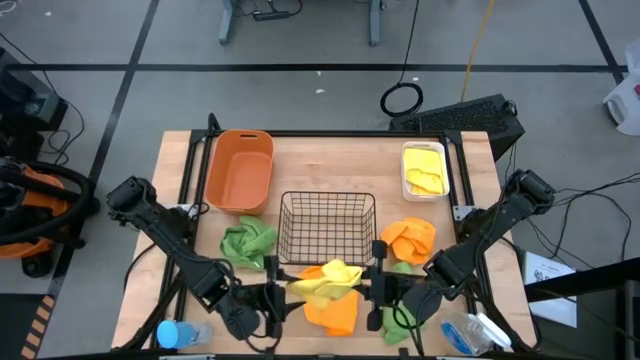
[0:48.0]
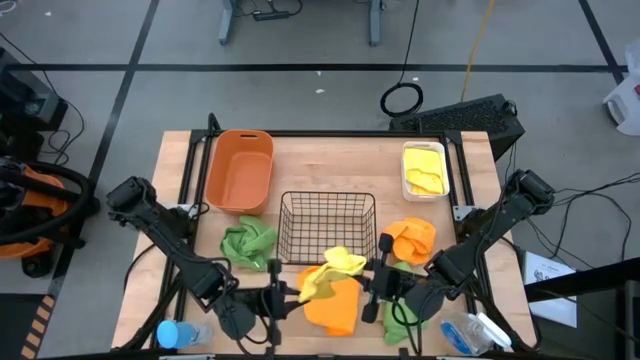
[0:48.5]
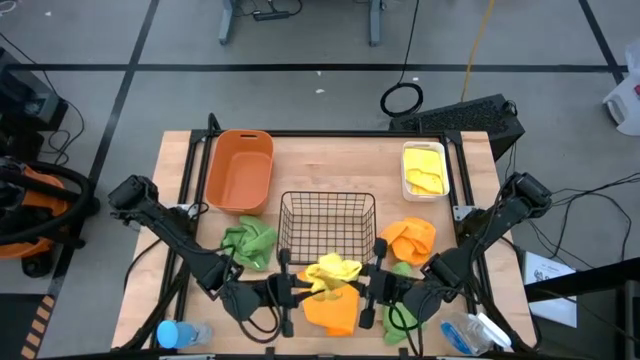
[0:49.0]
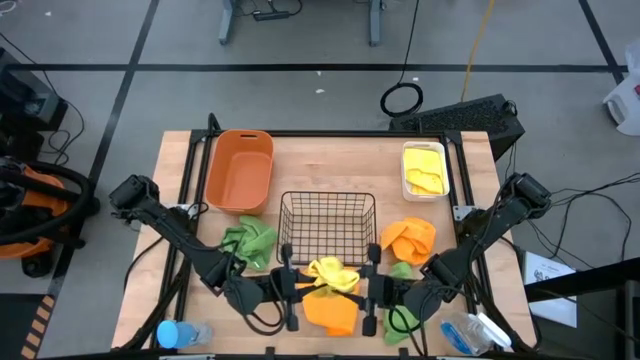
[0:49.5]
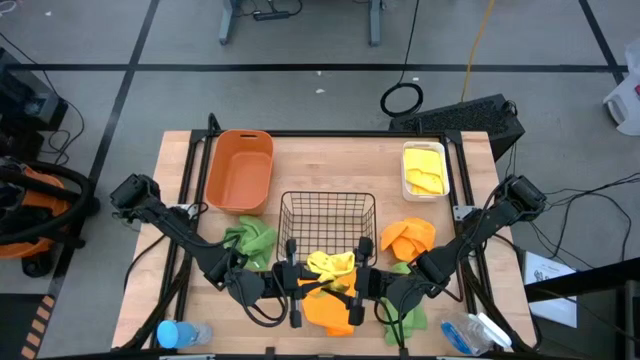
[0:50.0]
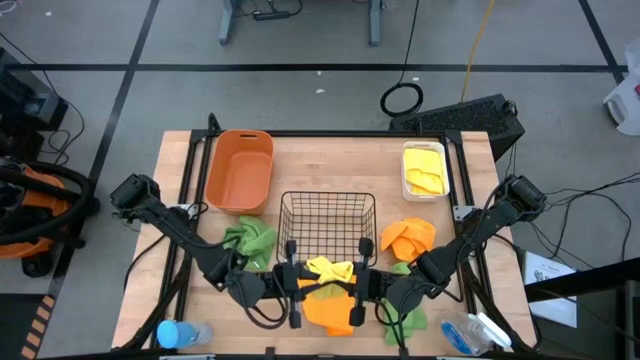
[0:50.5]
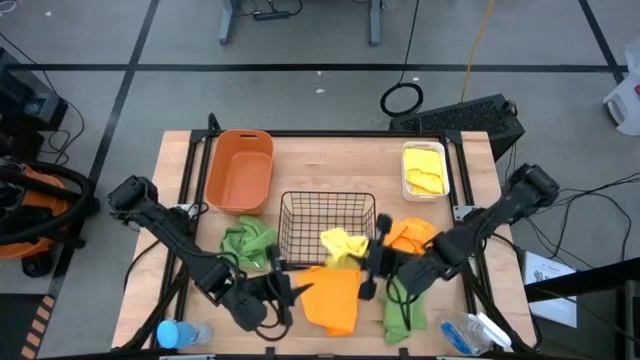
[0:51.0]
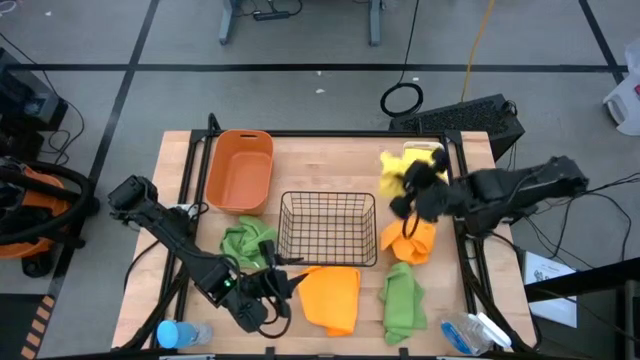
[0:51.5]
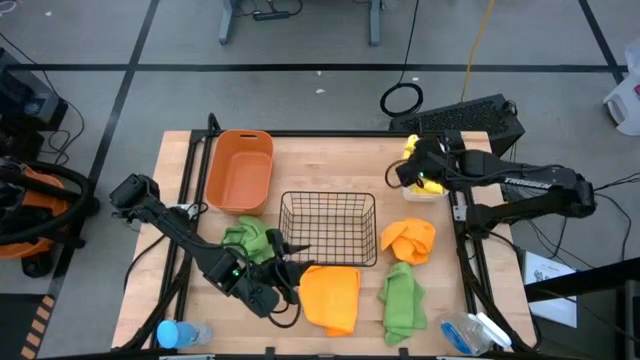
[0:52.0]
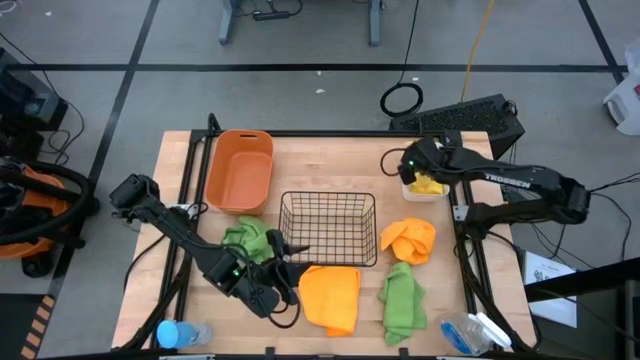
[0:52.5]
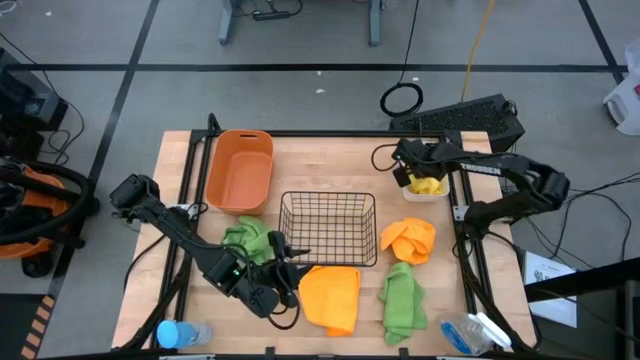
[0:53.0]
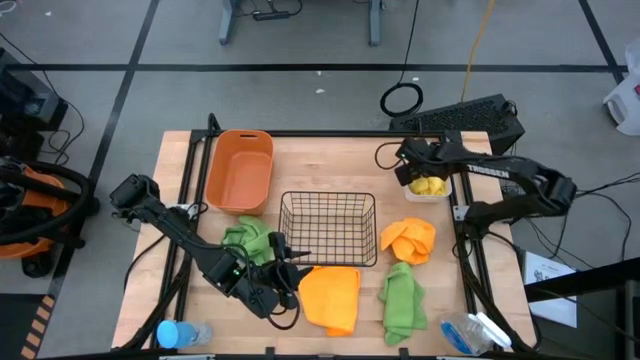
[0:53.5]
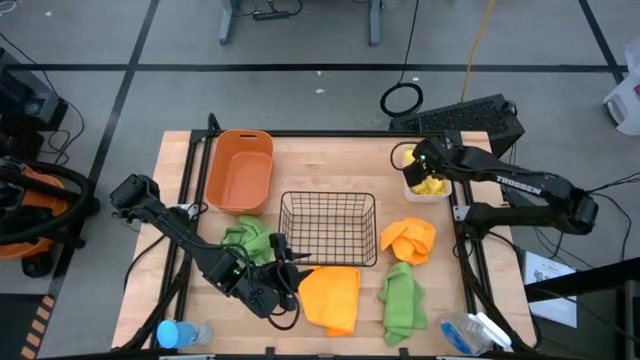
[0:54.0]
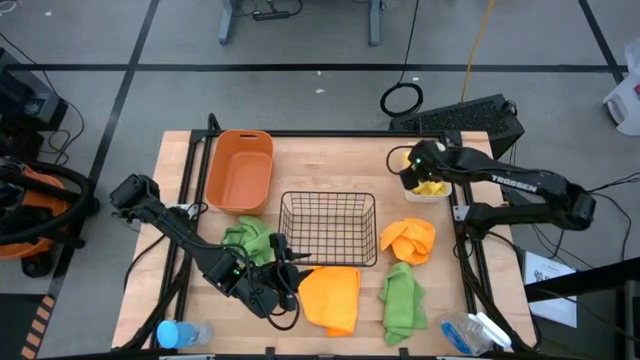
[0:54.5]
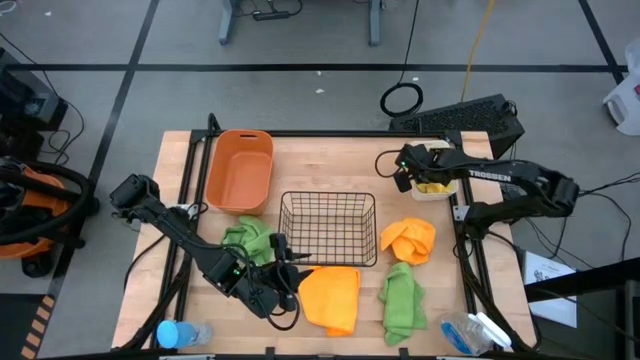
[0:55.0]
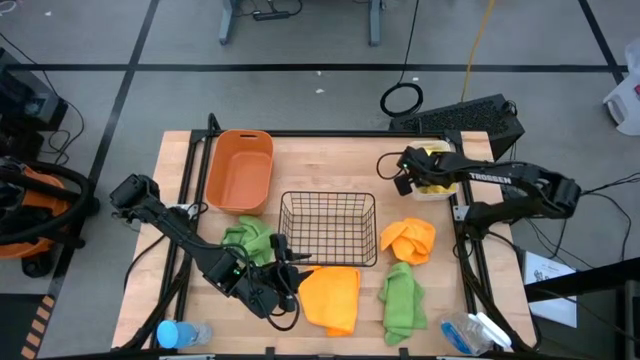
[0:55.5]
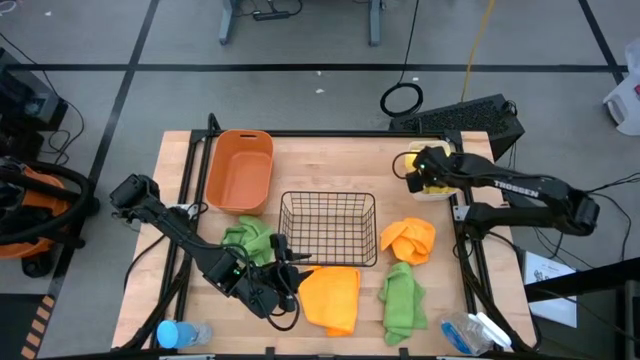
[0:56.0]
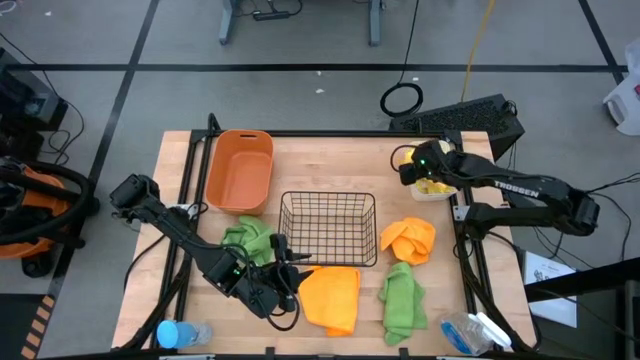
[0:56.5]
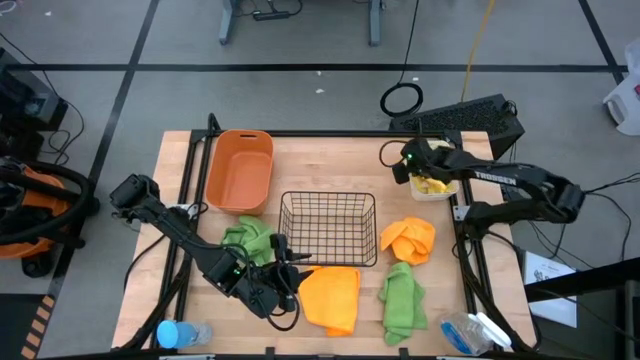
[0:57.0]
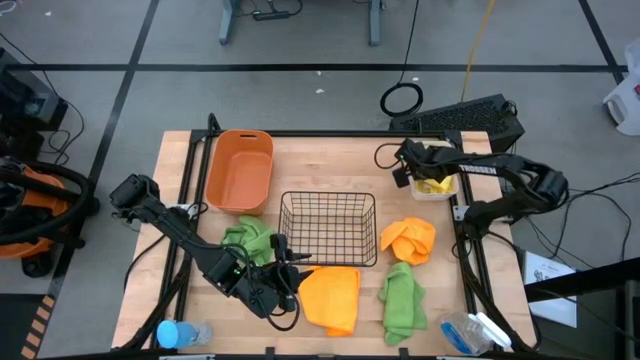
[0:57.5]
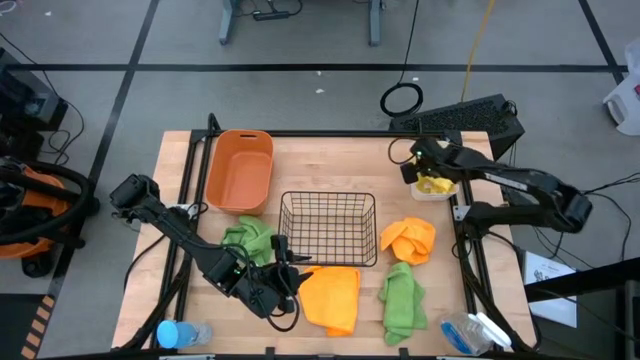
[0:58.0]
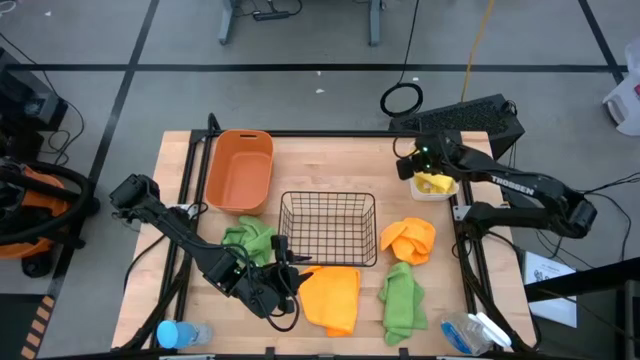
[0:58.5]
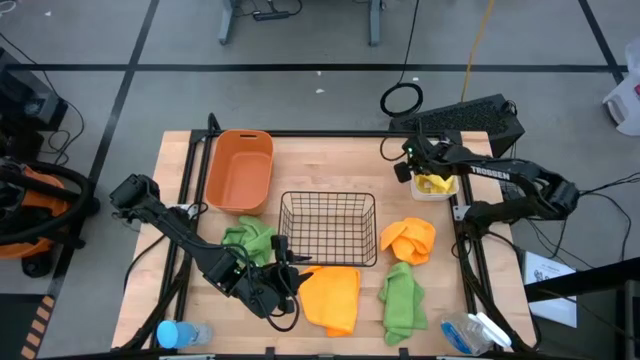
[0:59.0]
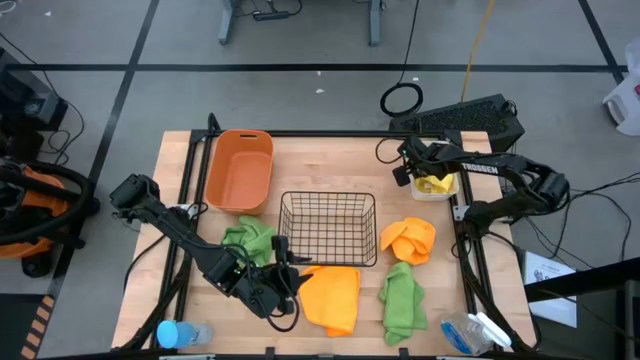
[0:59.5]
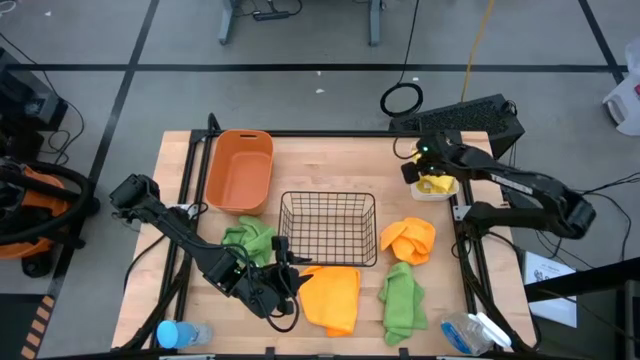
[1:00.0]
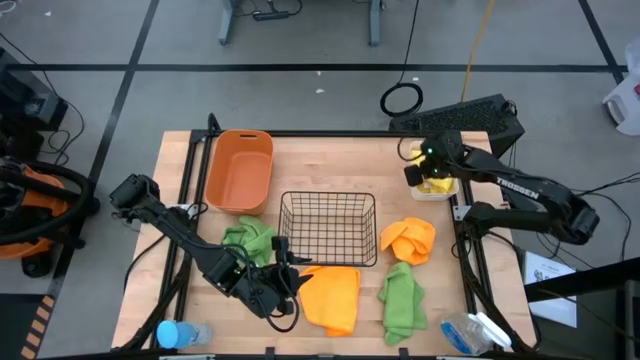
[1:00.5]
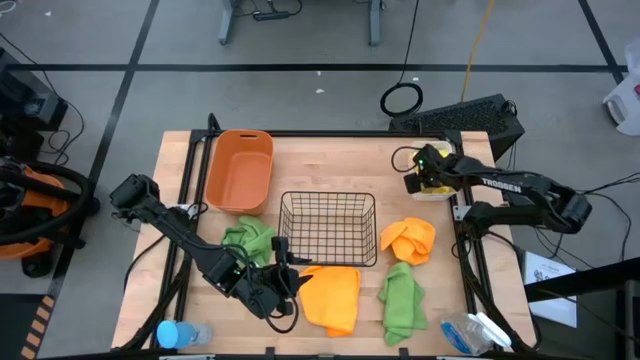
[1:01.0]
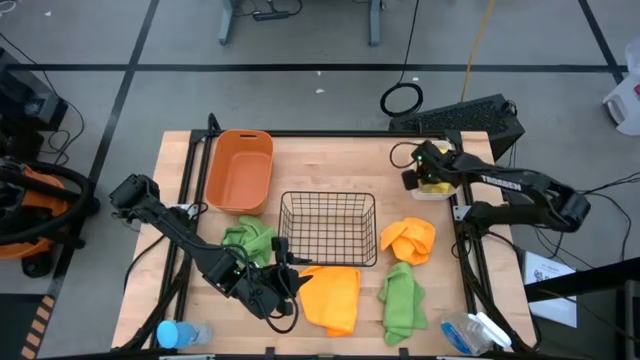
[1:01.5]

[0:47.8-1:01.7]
Task: Sort microfiber towel by color & place in baskets
Put the yellow microfiber towel into the white bin

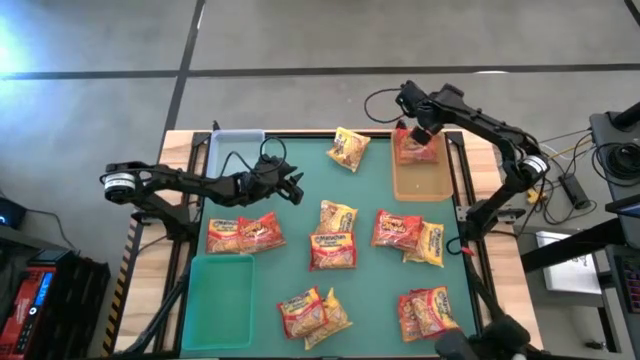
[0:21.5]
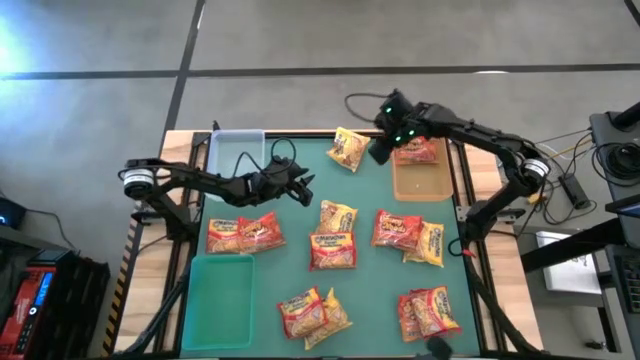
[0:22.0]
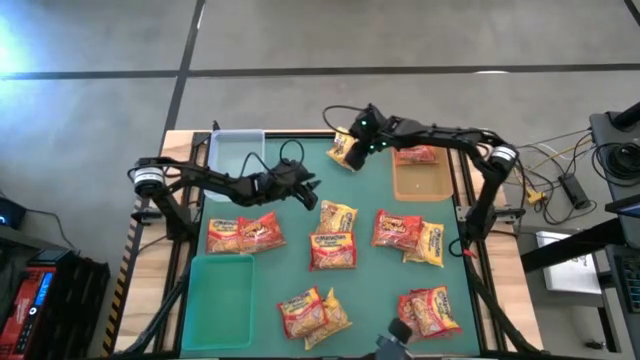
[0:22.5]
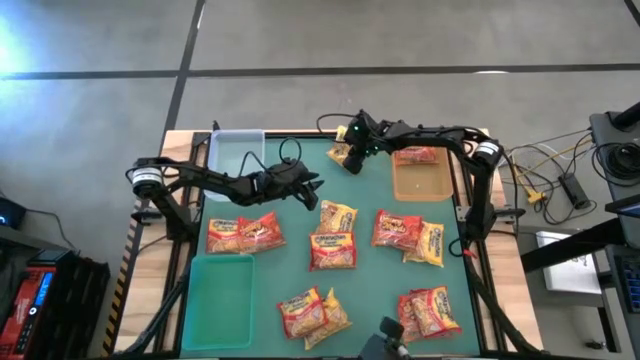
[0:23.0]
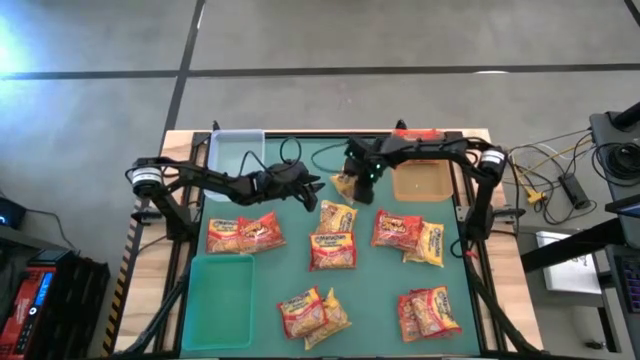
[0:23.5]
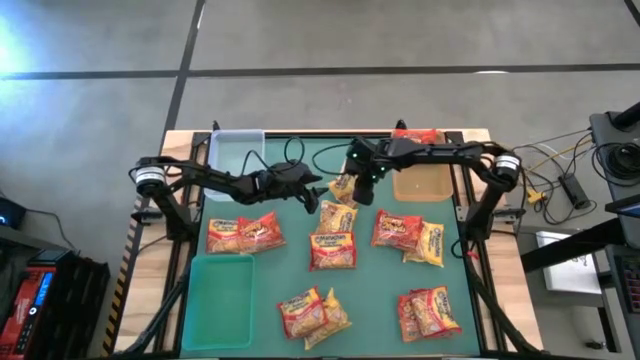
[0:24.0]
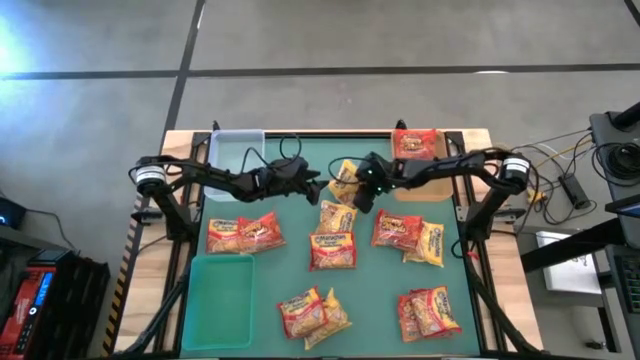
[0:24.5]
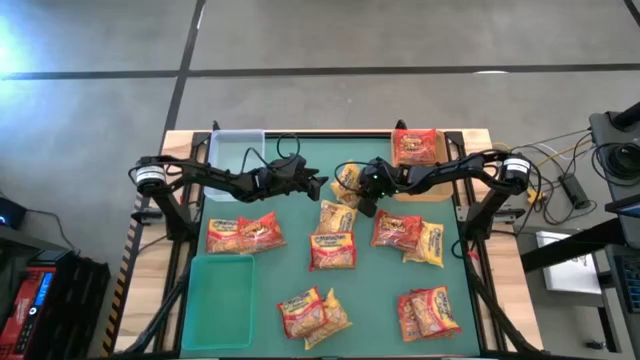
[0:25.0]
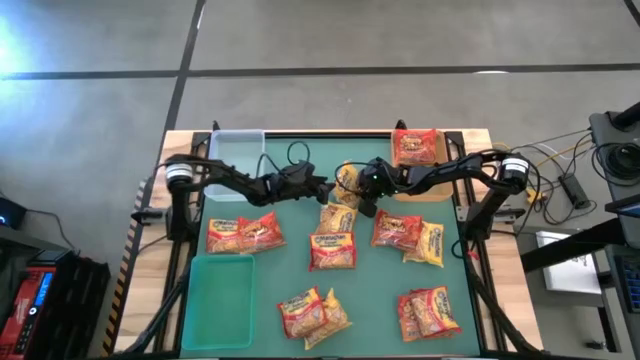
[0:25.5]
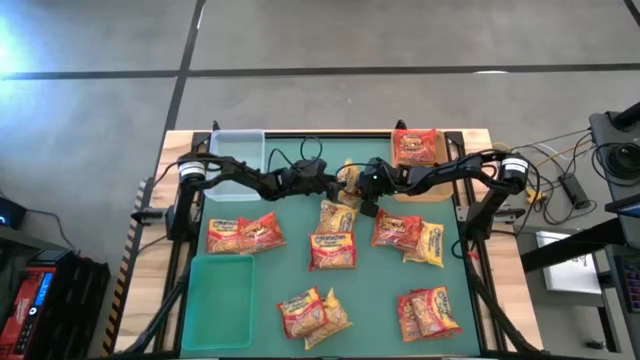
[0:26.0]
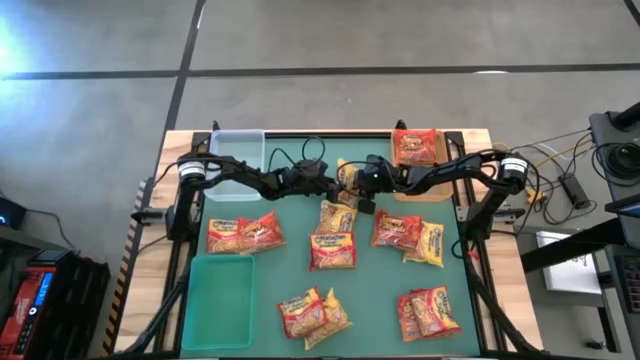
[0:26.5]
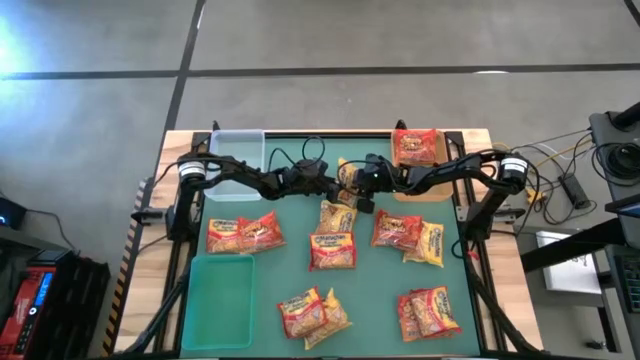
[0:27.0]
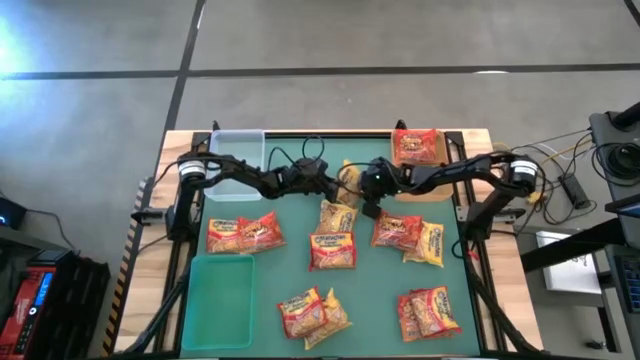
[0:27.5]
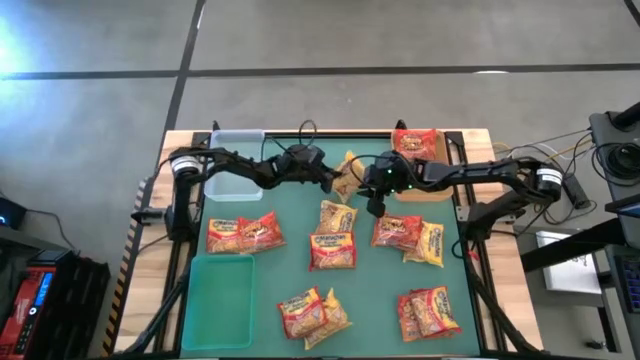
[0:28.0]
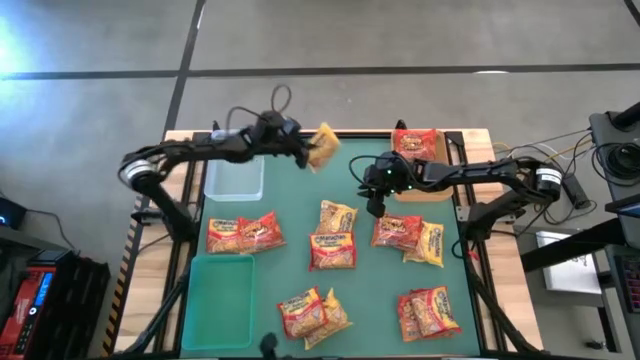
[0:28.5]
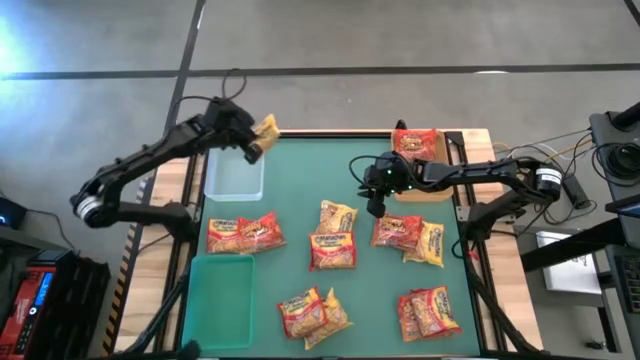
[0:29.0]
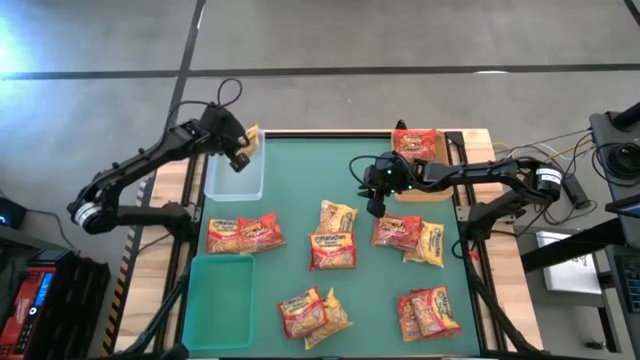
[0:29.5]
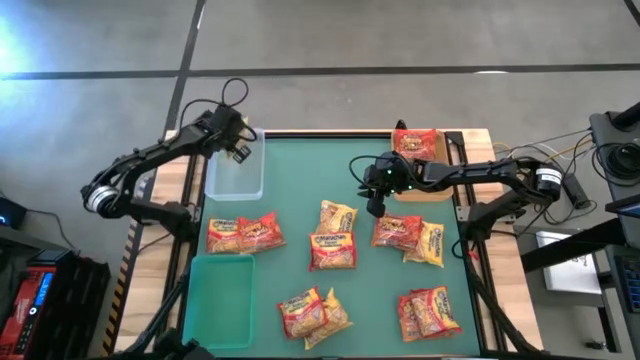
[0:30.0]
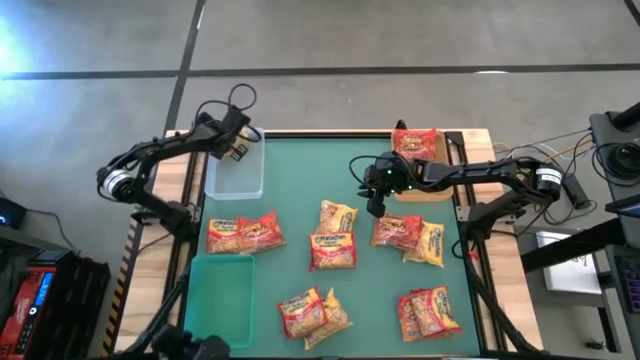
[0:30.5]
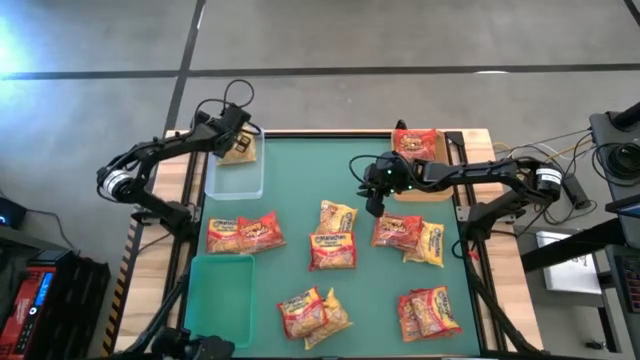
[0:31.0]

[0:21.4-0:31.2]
Task: Sort Maruchan noodles
Put the yellow noodle pack into the transparent bin
